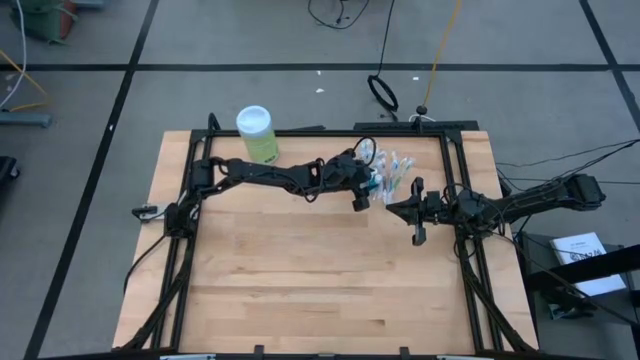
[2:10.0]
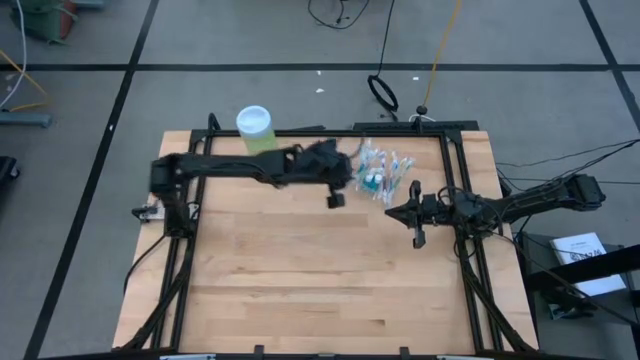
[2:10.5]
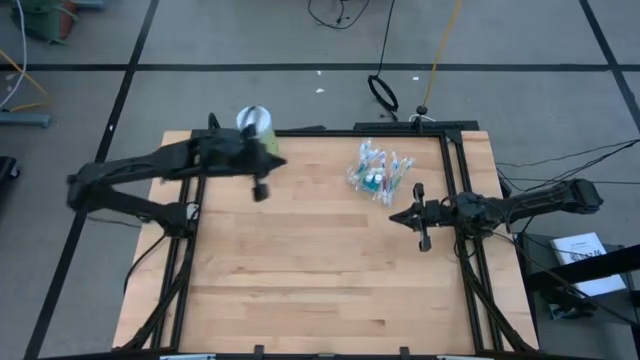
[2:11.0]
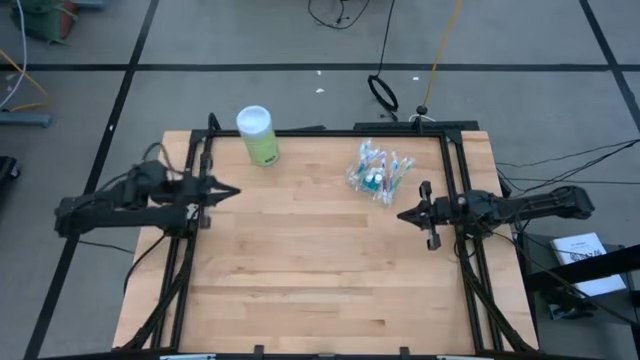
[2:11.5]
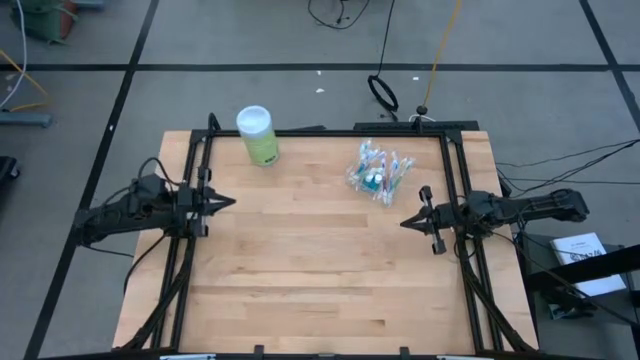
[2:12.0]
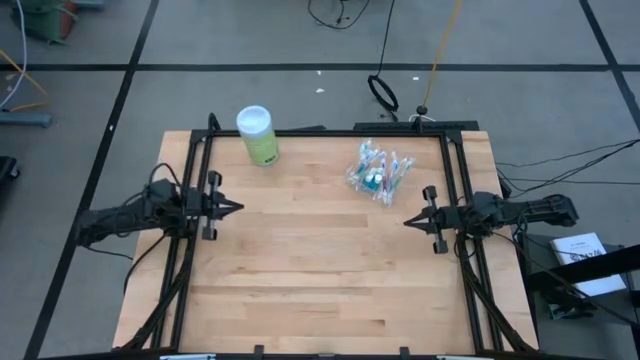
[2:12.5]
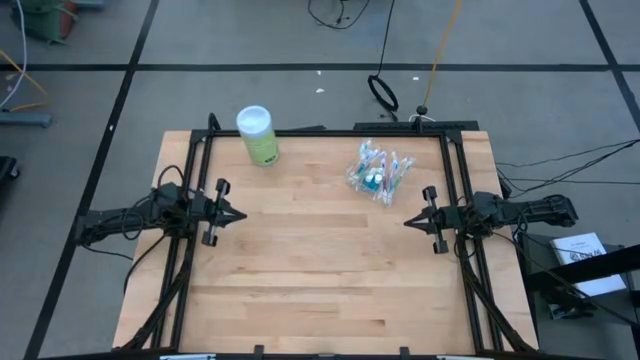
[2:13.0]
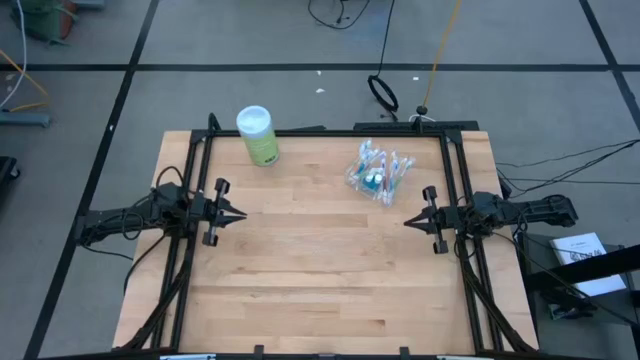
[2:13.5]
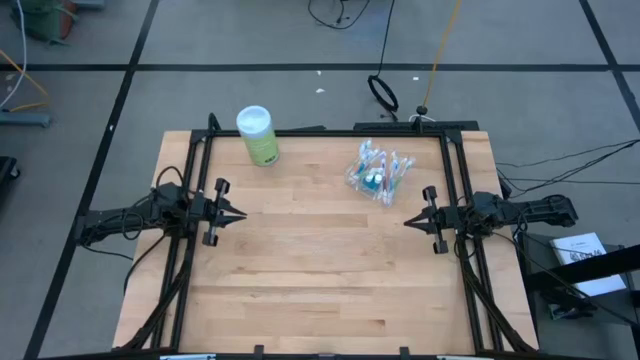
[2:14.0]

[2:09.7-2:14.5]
Task: Pick & Place toothbrushing station
Return to Home Position

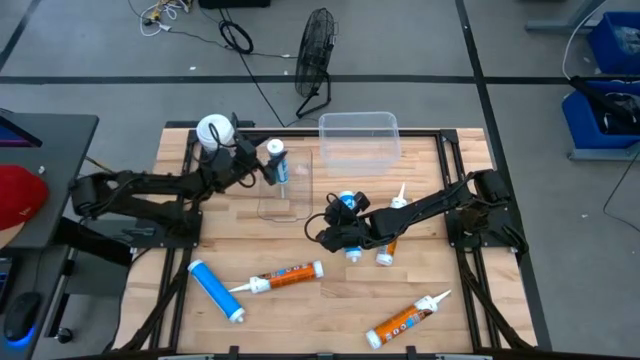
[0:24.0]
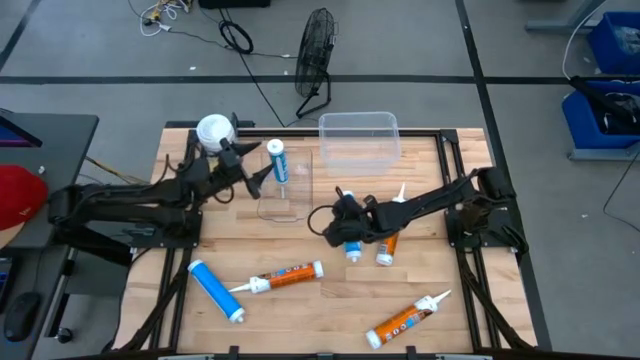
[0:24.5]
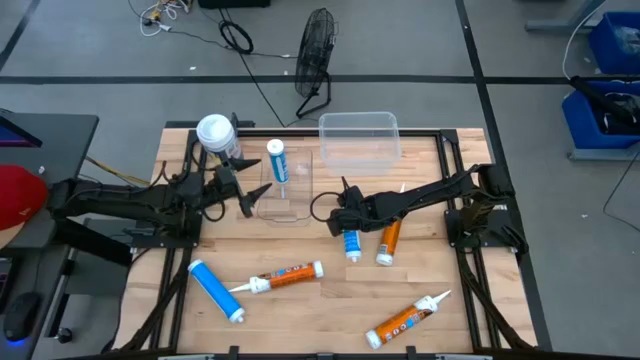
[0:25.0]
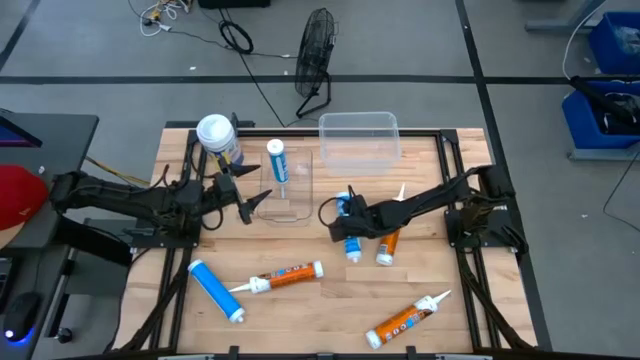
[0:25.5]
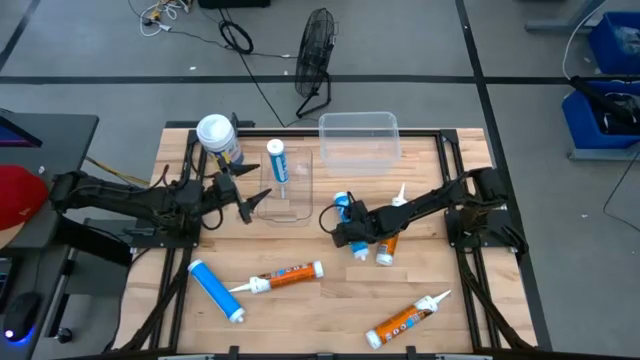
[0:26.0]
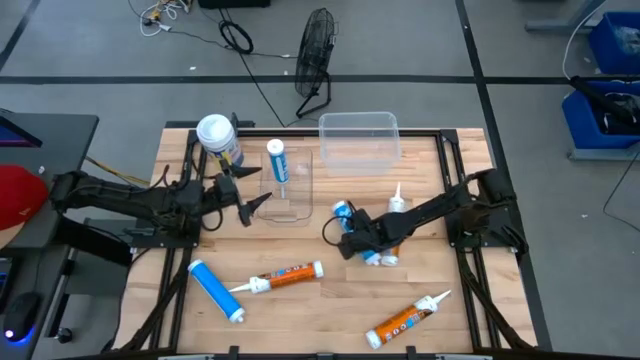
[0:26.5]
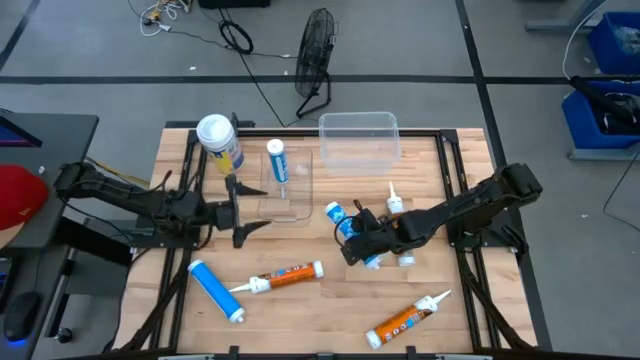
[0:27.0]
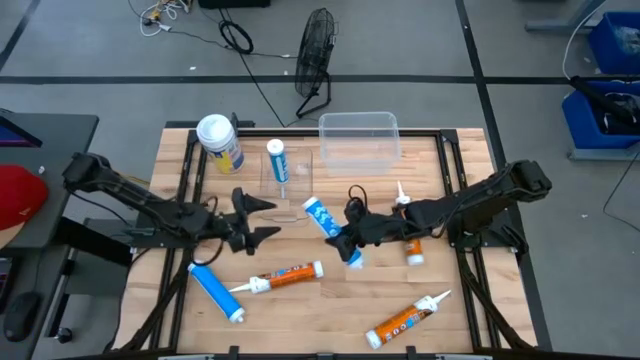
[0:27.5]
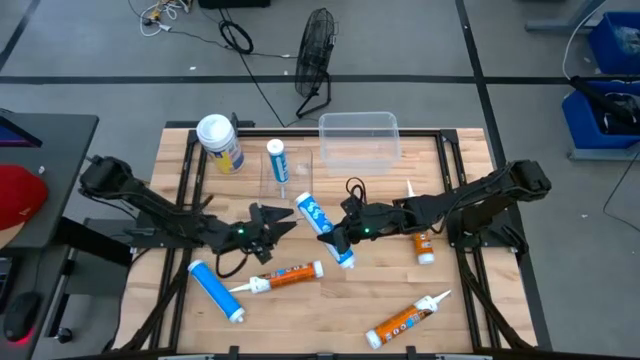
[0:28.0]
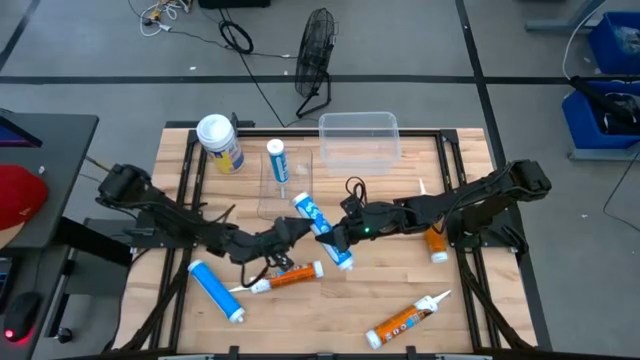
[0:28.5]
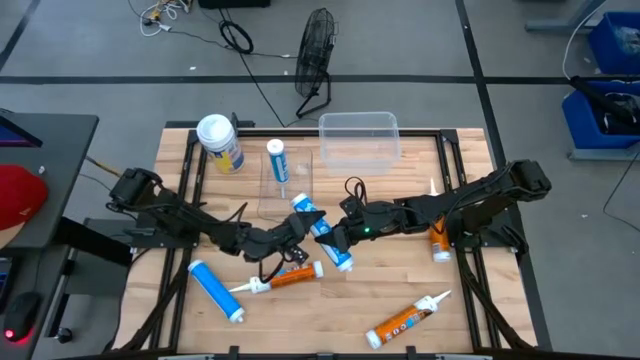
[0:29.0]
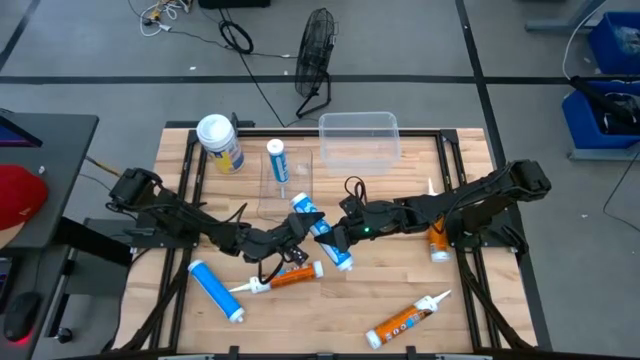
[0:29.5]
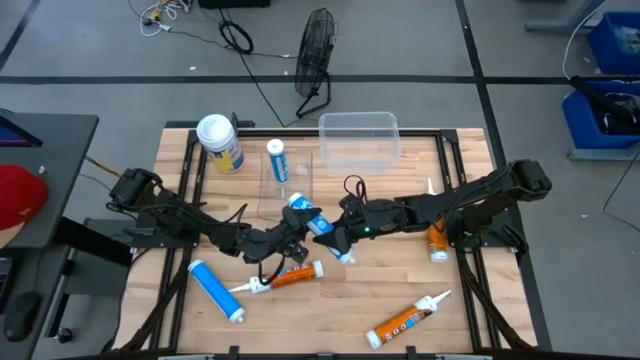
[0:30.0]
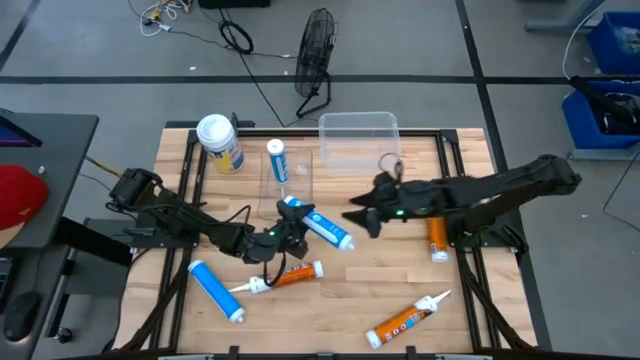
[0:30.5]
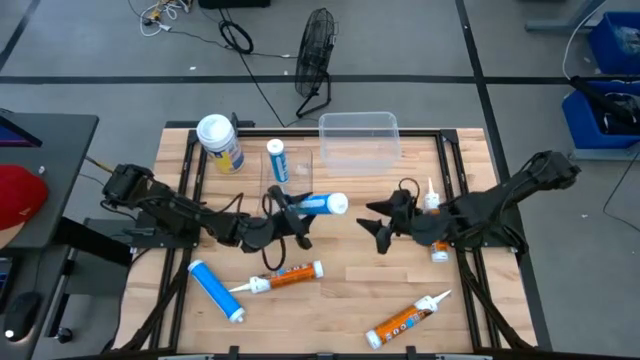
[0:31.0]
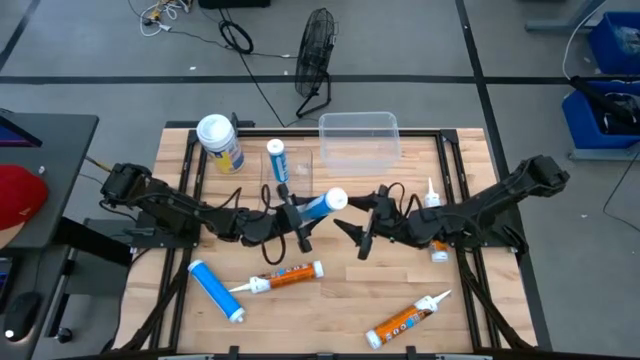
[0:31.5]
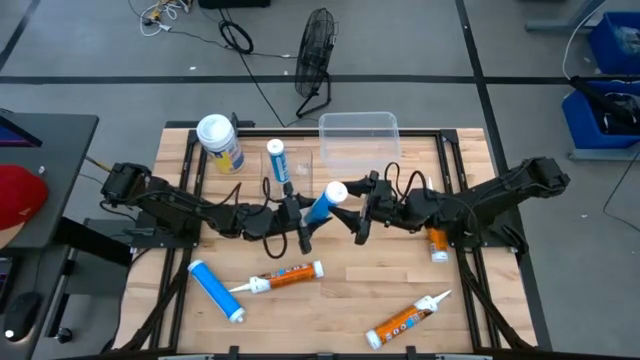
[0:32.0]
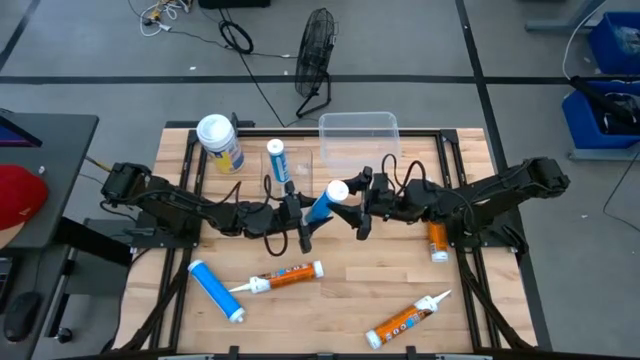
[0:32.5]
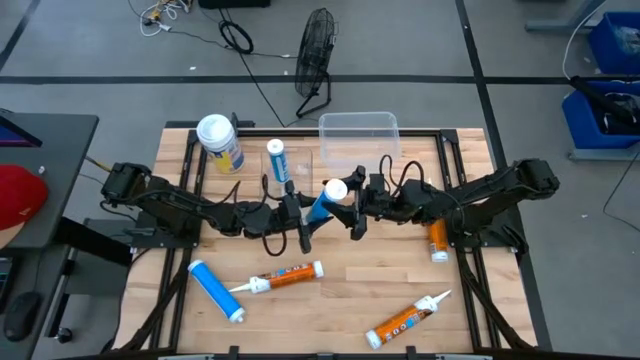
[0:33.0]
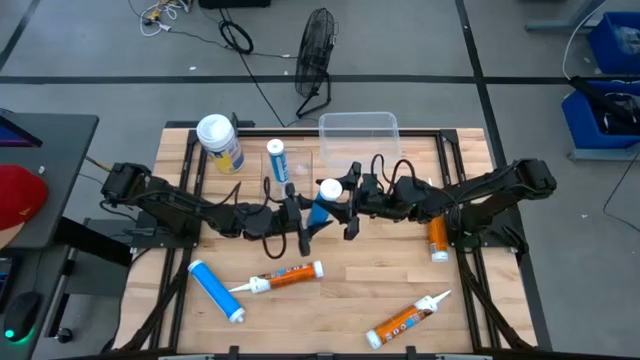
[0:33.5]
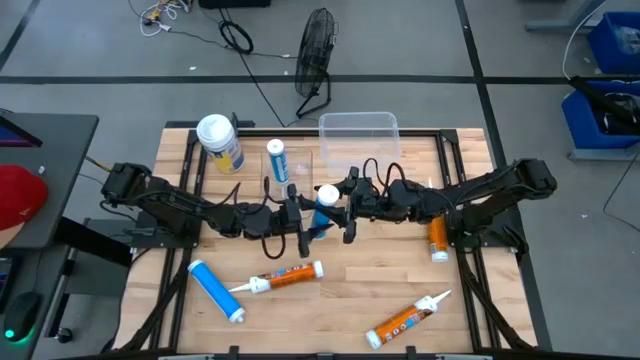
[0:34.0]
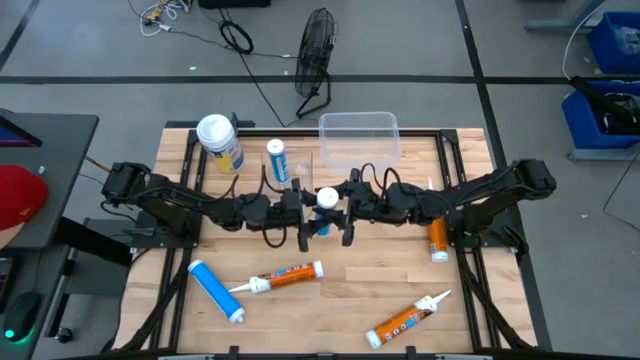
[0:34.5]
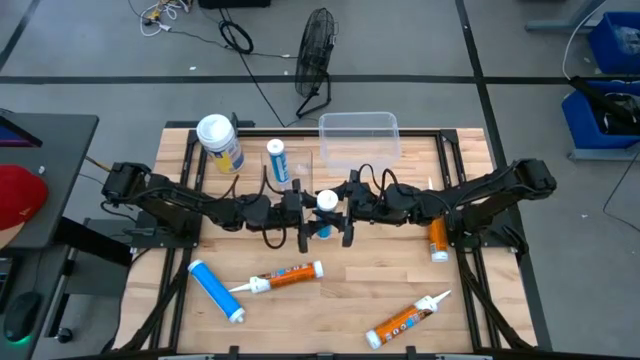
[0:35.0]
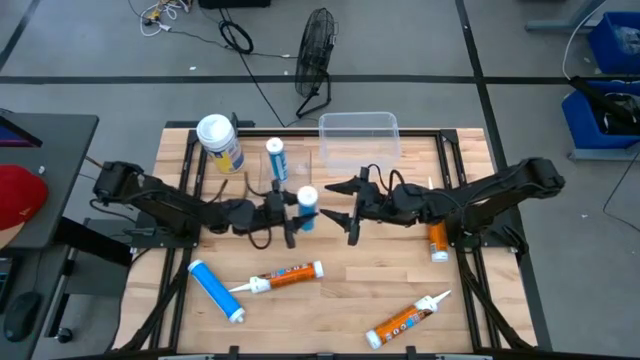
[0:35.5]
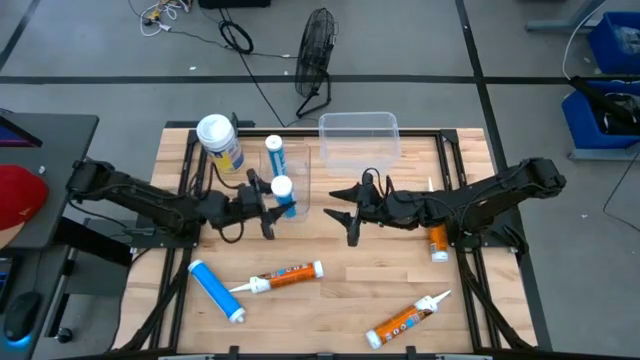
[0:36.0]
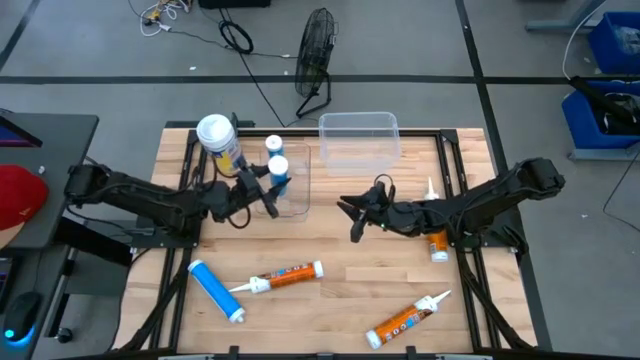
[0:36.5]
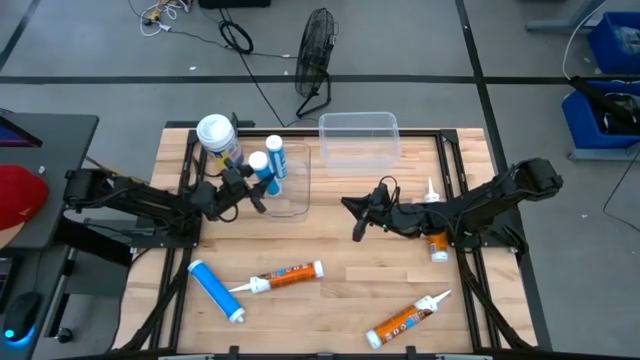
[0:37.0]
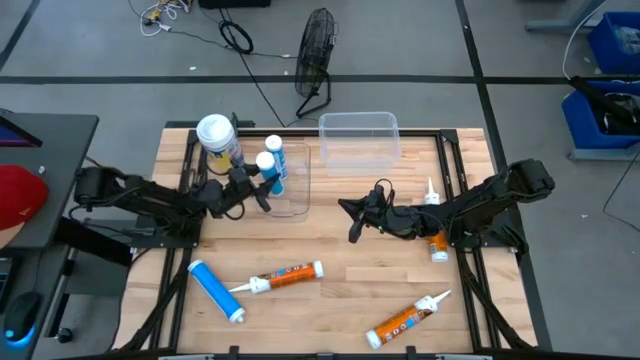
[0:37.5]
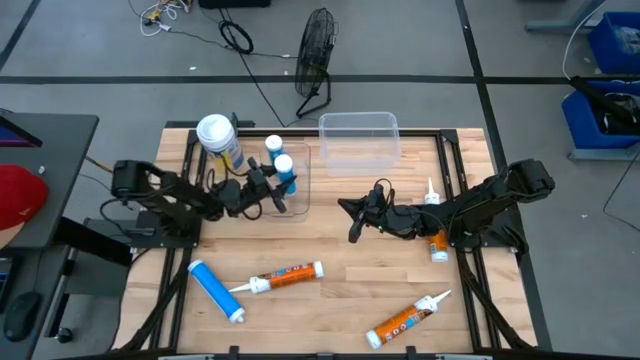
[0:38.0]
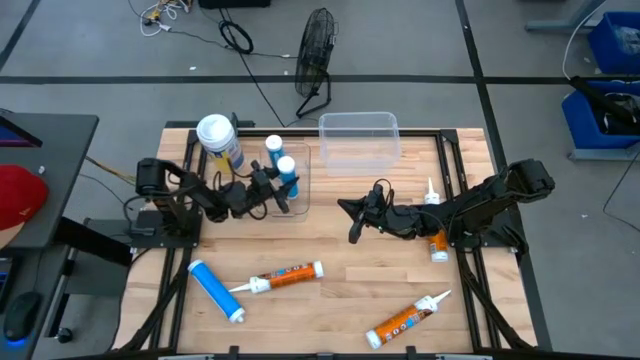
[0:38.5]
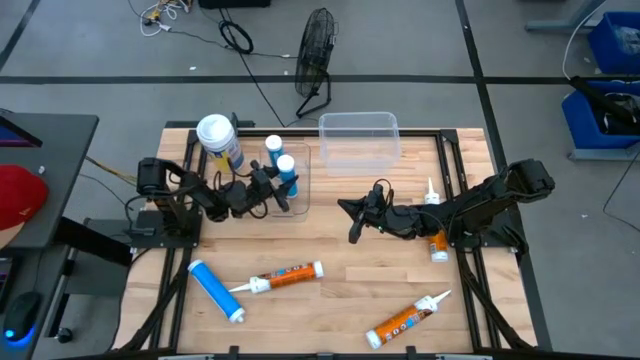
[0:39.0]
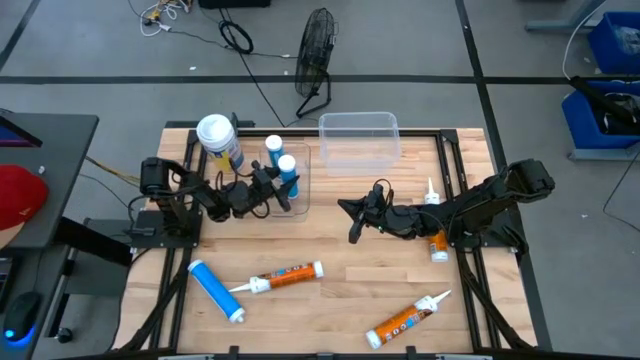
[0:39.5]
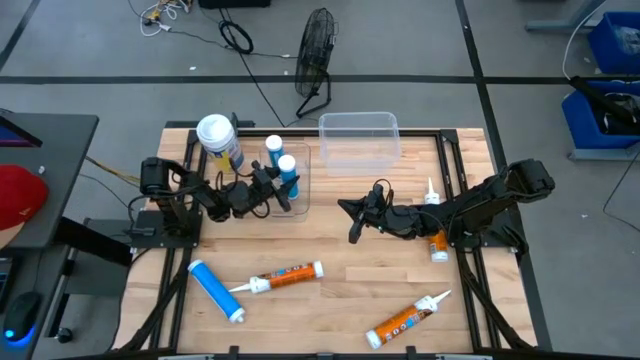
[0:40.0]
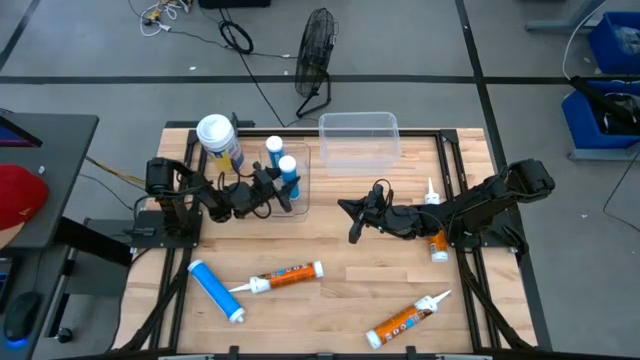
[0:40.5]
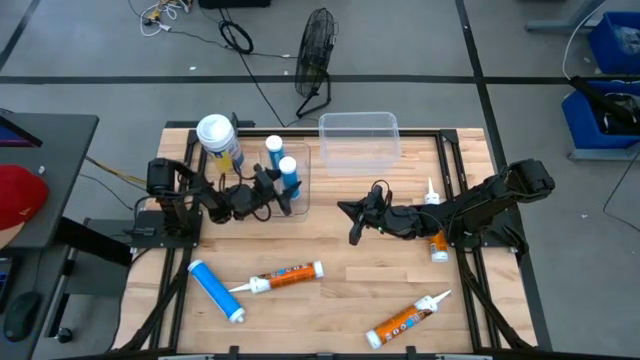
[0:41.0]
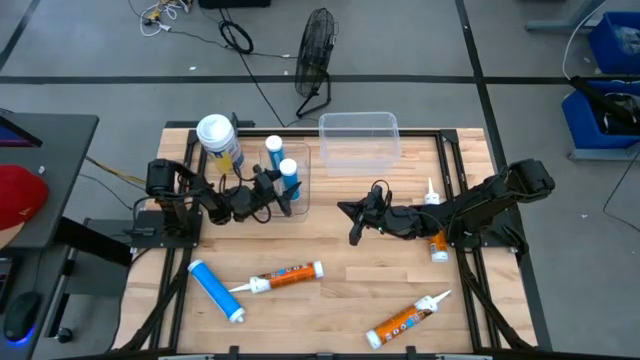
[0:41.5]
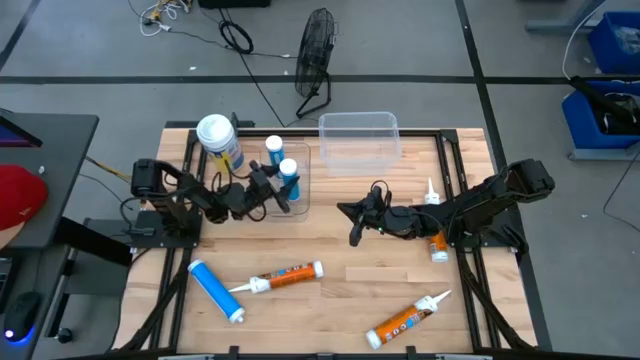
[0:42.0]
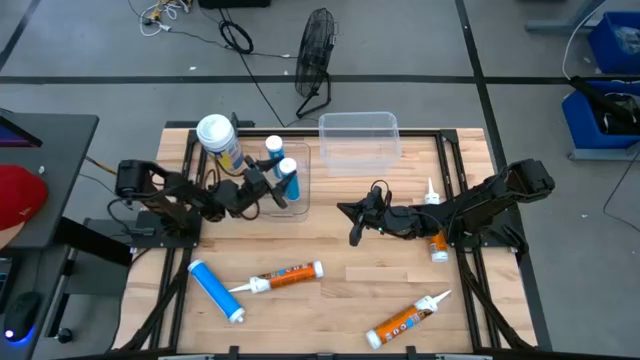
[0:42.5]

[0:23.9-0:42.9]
Task: Pick & place silicon tubes, Sealant and Lysol wipes
Put the right blue sealant into the left transparent bin
